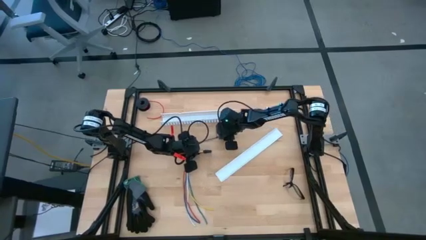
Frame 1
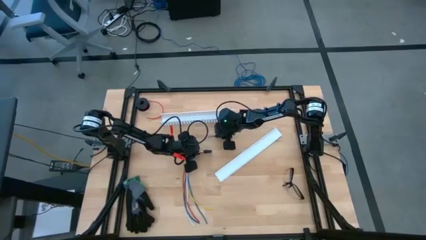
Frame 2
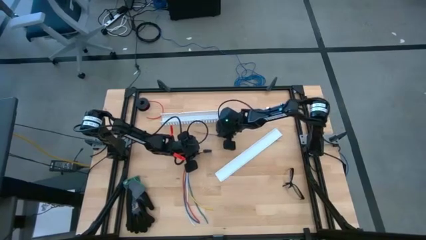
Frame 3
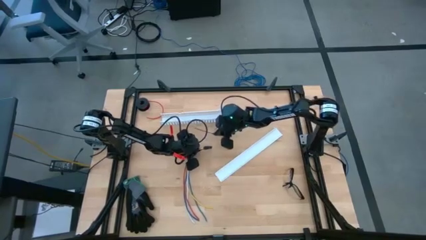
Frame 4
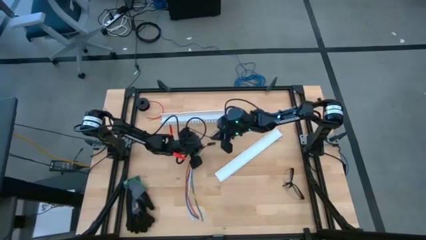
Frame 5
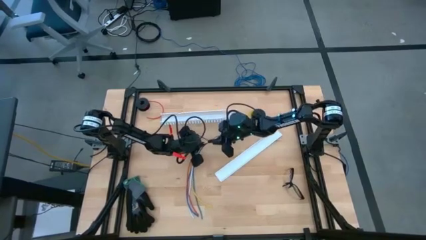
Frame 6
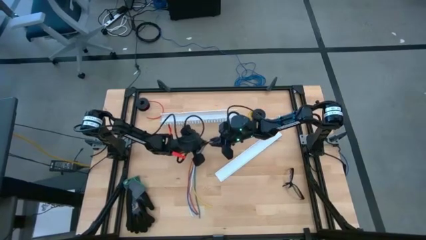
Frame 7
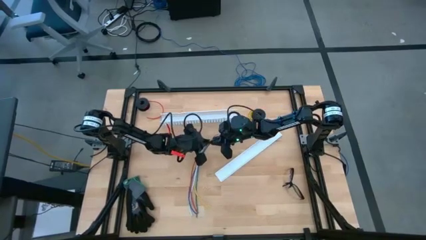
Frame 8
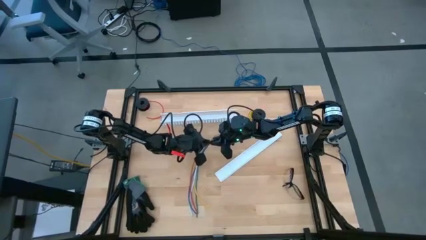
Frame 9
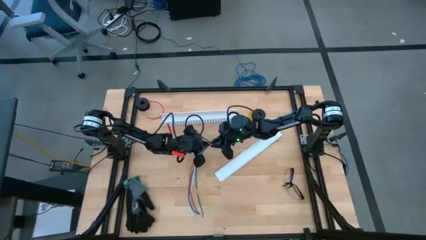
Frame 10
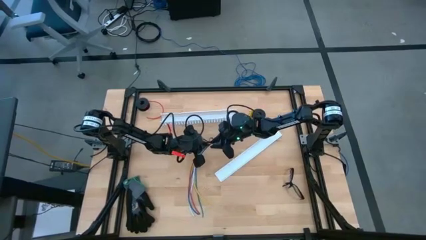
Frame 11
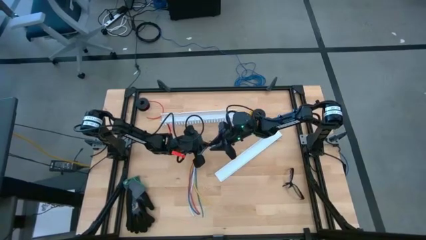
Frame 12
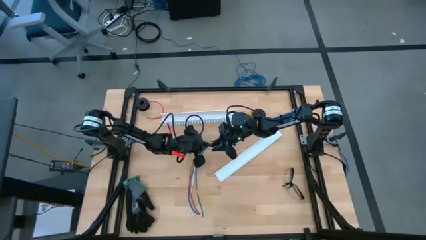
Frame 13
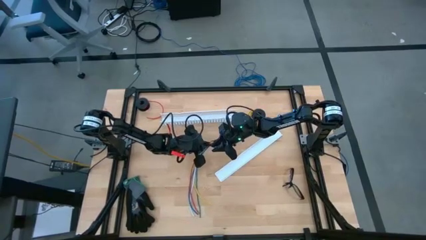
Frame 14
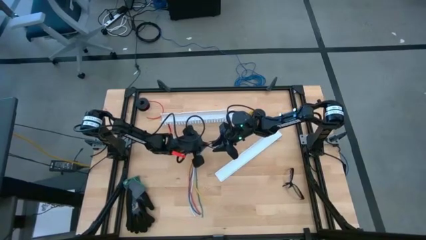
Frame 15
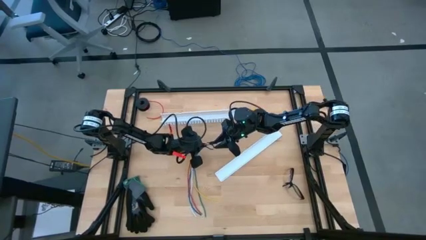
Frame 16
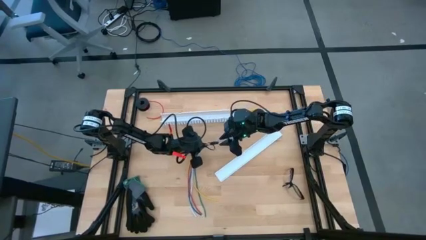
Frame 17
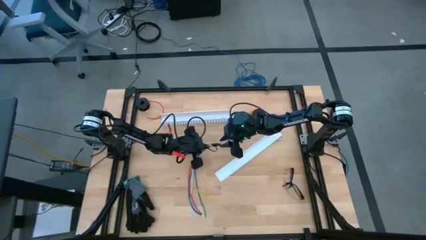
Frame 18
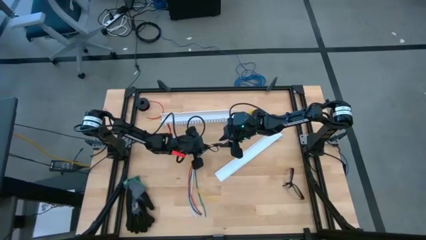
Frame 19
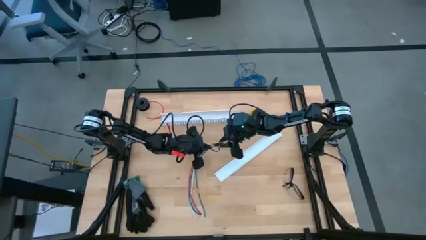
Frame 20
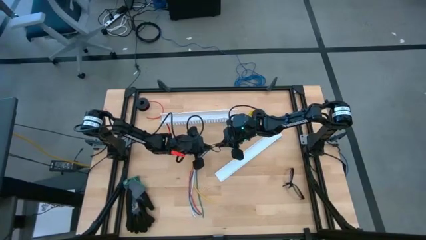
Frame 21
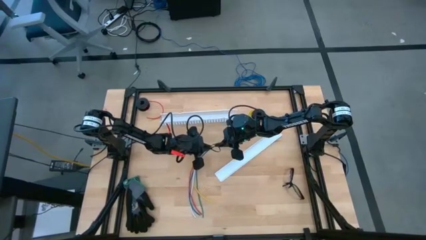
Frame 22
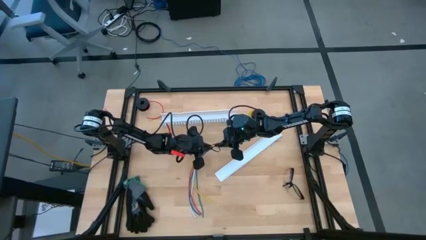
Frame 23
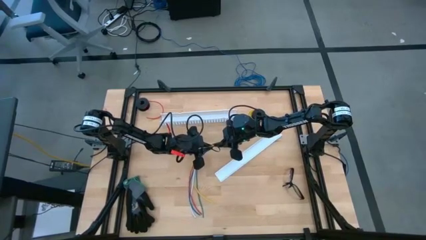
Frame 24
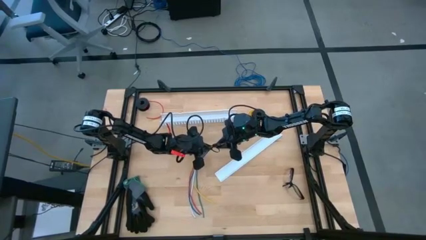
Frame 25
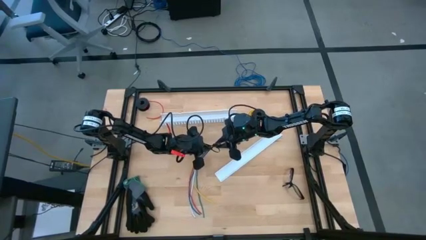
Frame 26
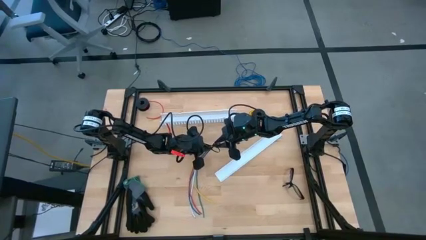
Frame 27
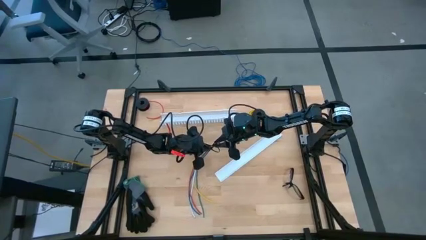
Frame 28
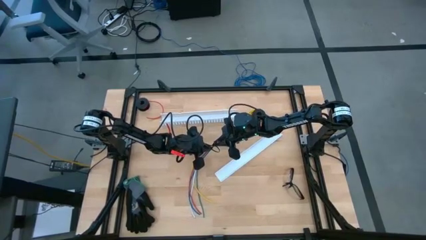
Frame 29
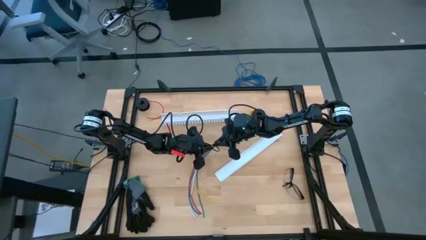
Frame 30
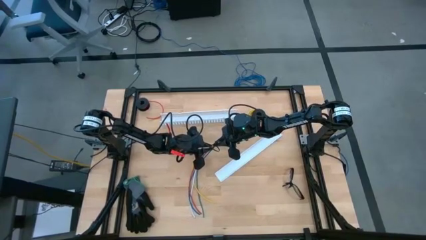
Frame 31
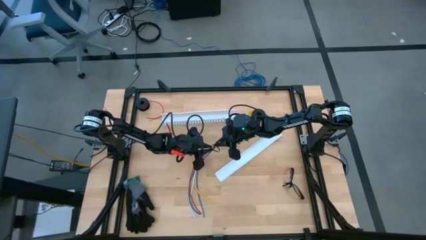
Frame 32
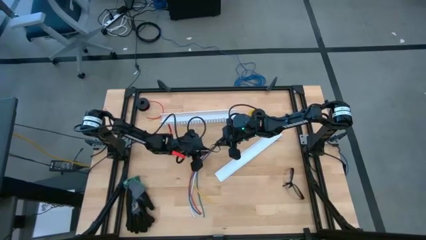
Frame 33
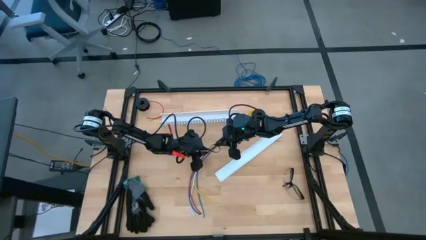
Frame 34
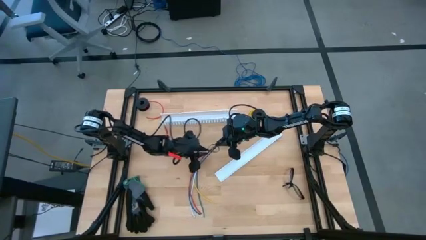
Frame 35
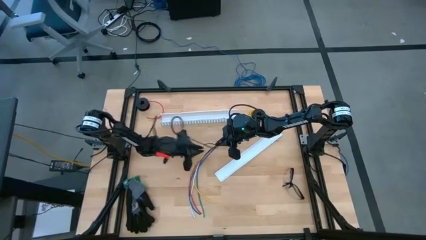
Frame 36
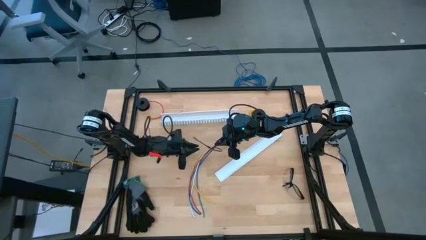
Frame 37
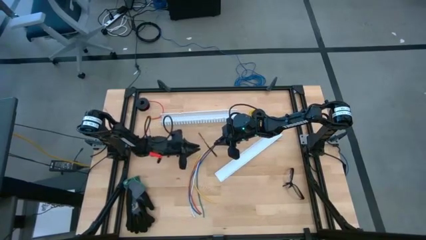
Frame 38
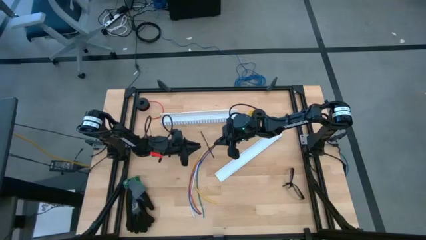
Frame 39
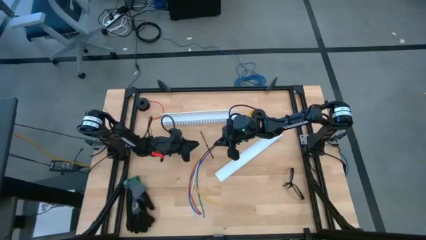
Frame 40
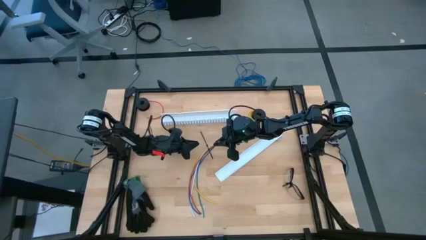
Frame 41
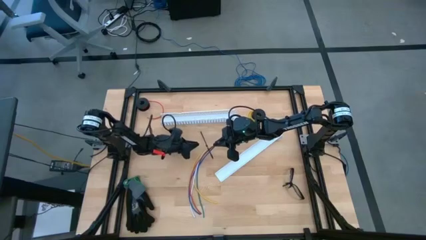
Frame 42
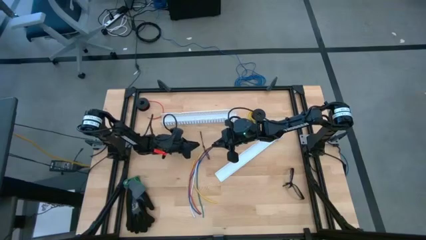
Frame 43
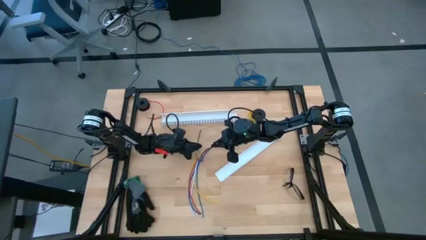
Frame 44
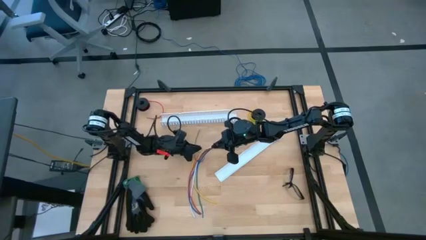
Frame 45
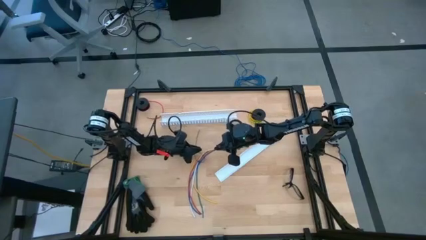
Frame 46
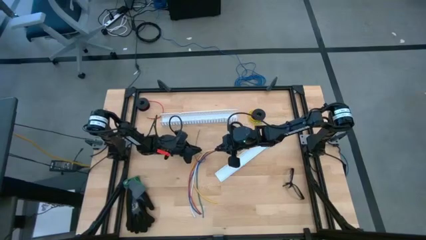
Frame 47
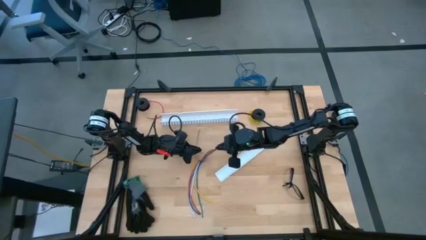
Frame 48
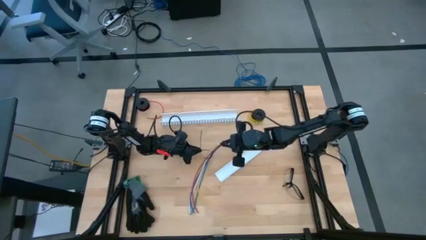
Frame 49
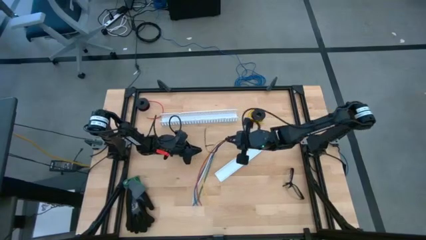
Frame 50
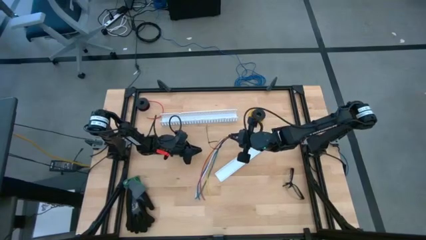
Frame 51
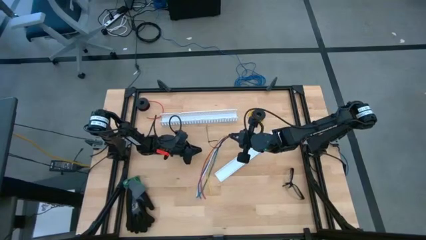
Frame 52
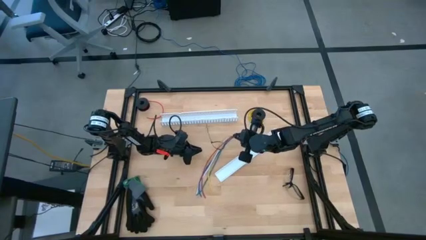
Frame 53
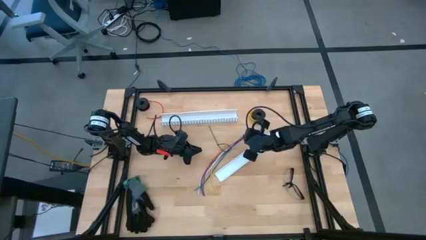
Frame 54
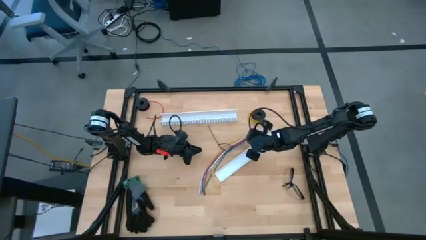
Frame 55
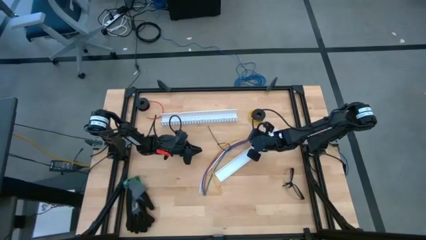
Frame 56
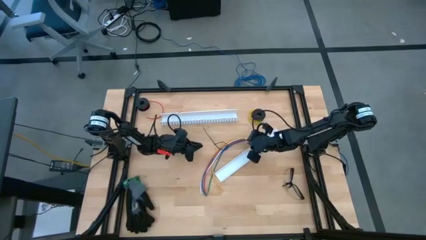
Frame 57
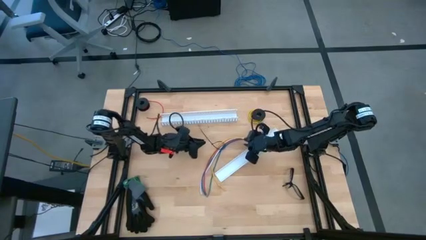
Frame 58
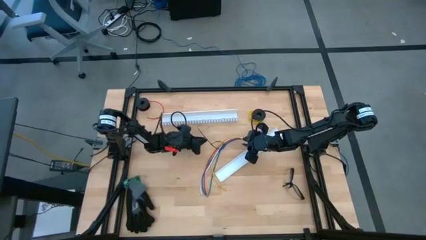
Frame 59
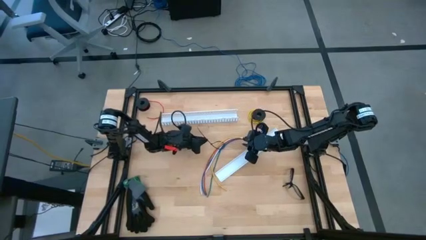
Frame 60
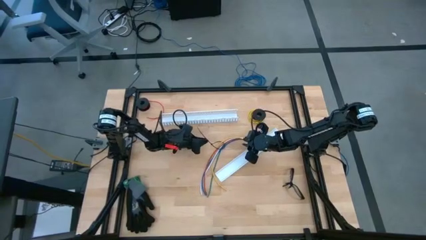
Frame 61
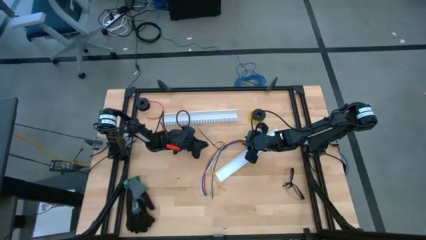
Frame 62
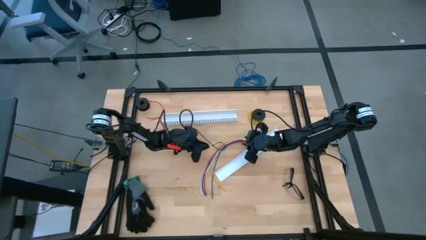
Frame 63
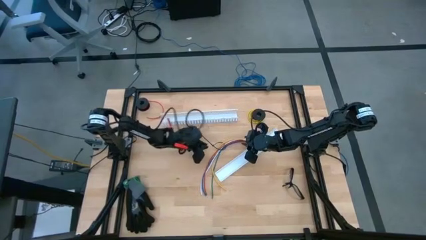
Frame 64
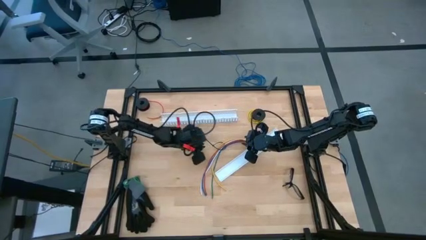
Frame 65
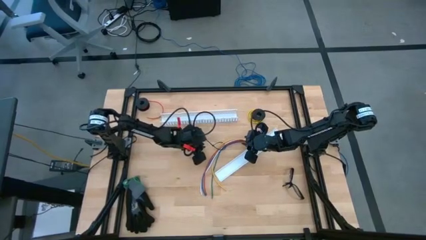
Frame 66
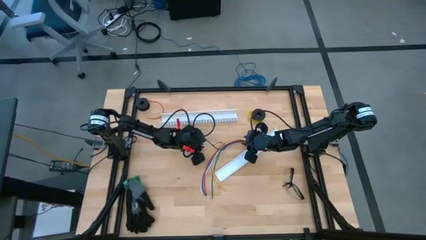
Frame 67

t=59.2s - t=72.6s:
Task: Ziptie cables
Wrap the cables together using the black zip tie
